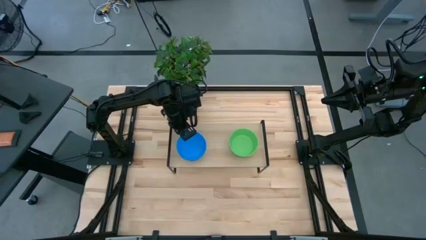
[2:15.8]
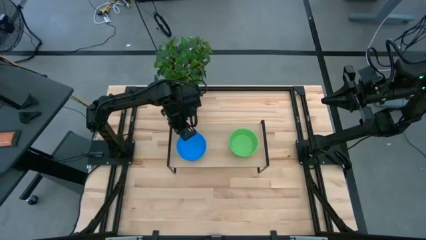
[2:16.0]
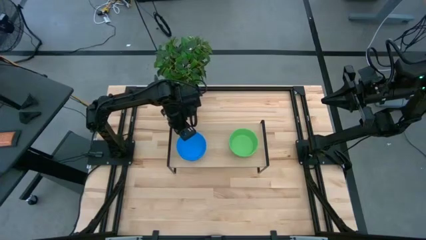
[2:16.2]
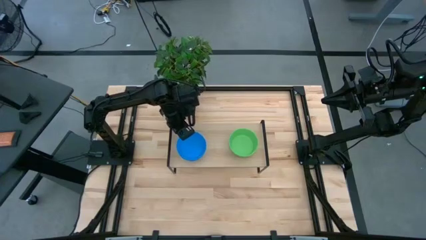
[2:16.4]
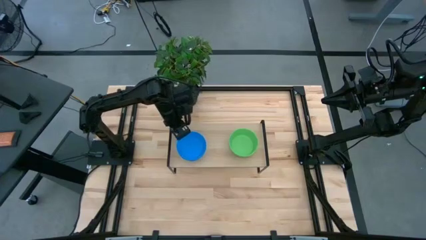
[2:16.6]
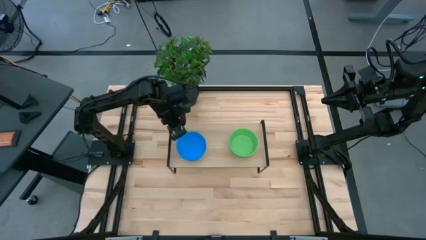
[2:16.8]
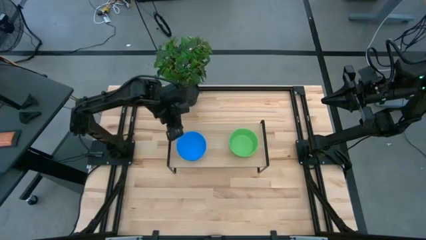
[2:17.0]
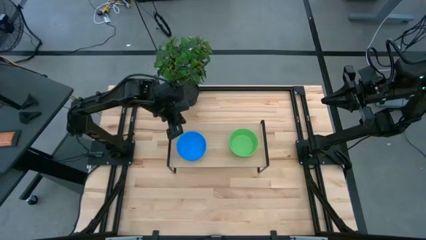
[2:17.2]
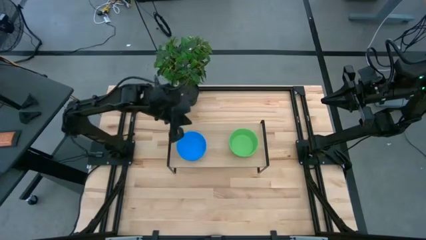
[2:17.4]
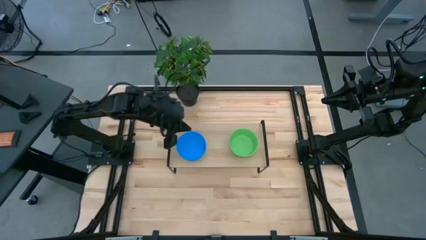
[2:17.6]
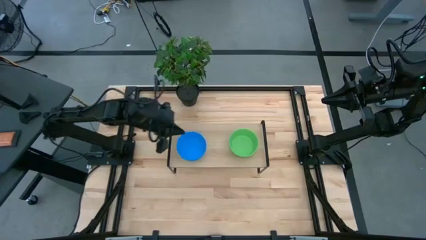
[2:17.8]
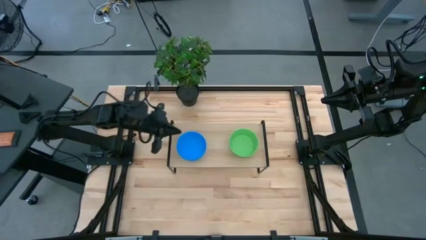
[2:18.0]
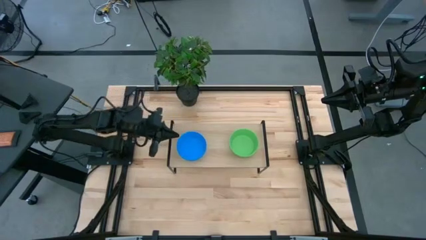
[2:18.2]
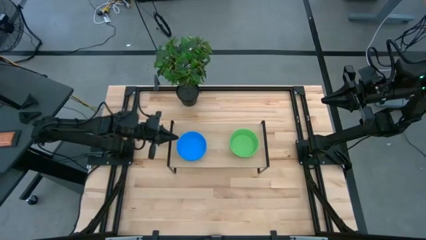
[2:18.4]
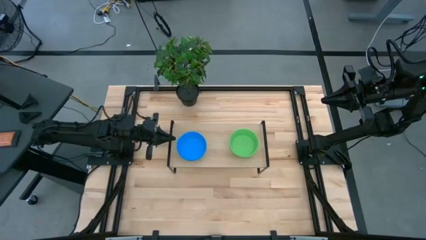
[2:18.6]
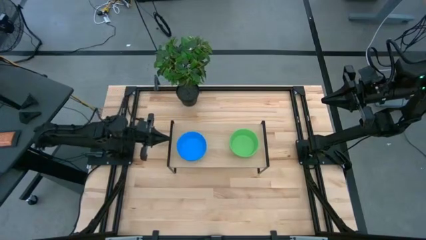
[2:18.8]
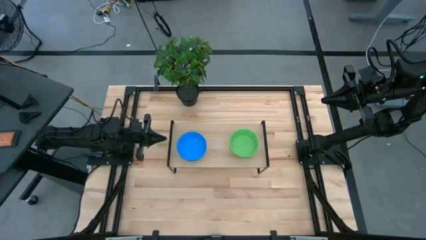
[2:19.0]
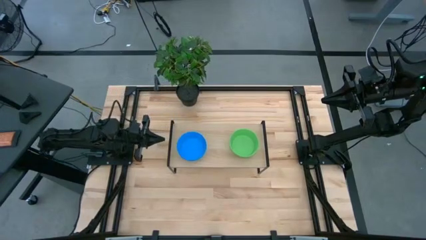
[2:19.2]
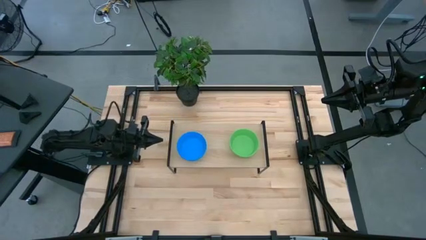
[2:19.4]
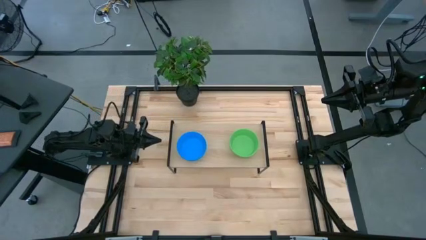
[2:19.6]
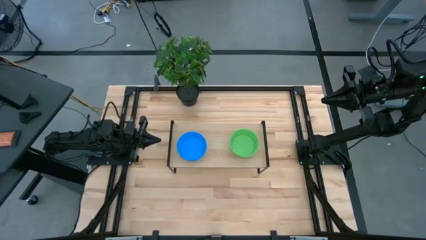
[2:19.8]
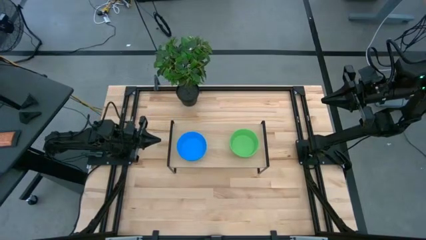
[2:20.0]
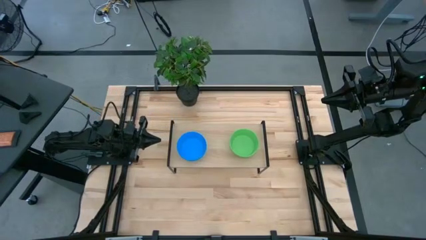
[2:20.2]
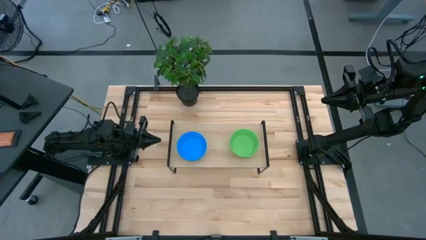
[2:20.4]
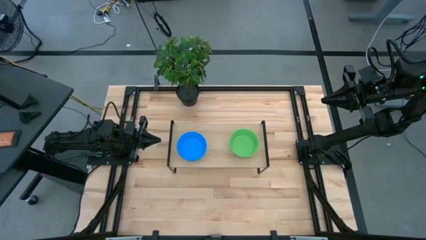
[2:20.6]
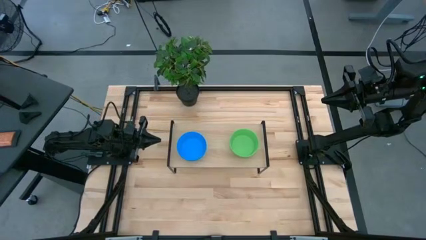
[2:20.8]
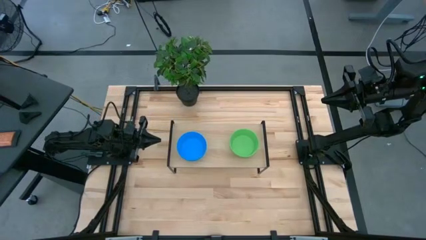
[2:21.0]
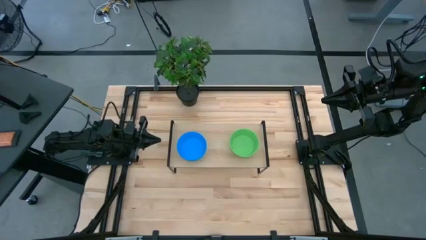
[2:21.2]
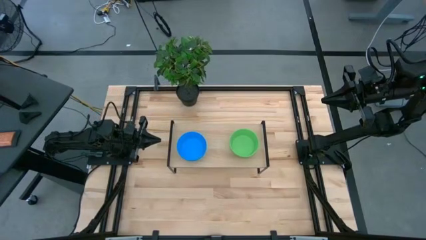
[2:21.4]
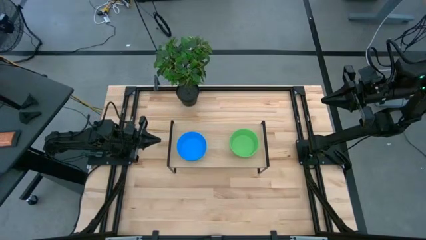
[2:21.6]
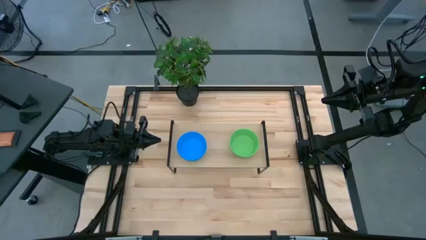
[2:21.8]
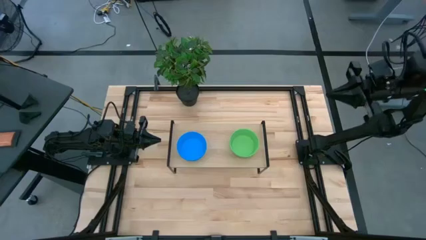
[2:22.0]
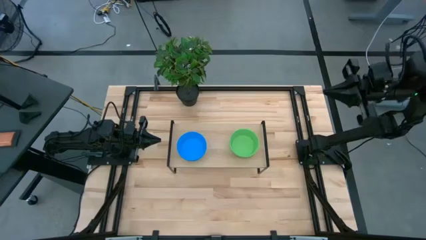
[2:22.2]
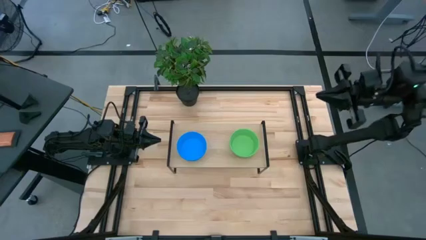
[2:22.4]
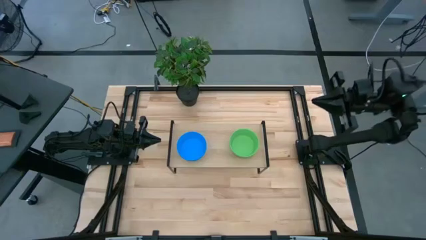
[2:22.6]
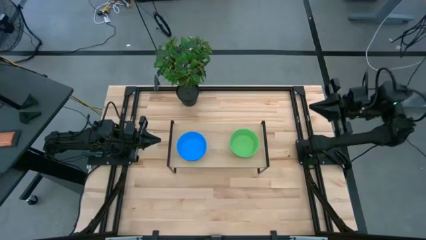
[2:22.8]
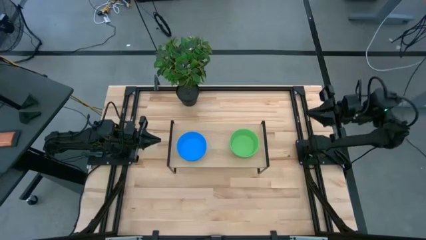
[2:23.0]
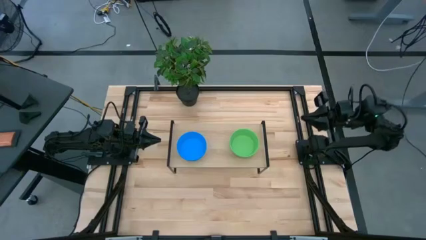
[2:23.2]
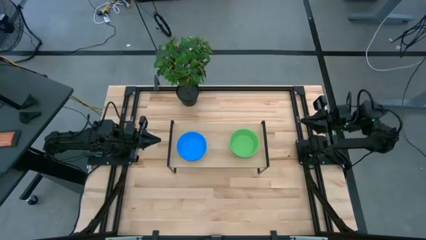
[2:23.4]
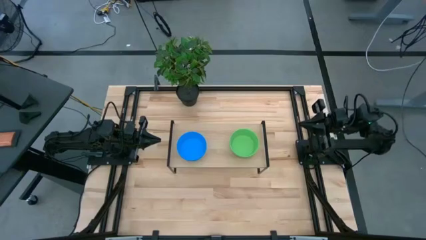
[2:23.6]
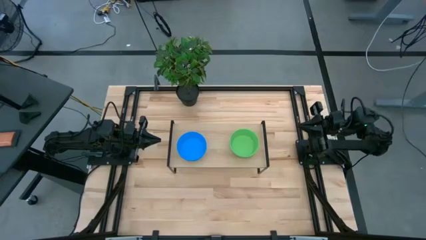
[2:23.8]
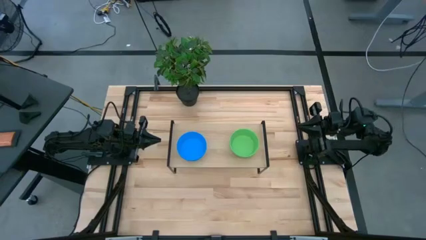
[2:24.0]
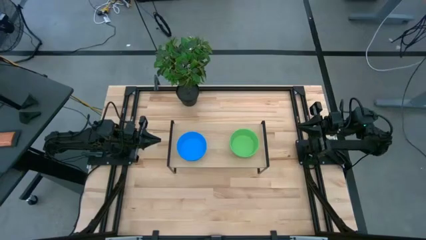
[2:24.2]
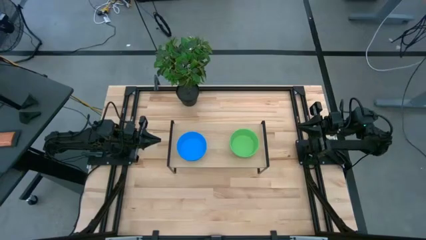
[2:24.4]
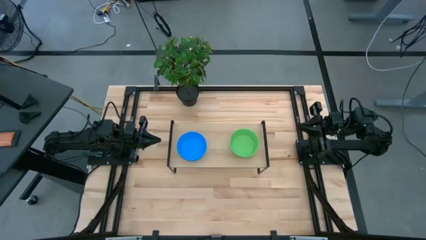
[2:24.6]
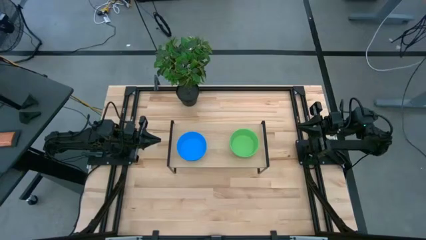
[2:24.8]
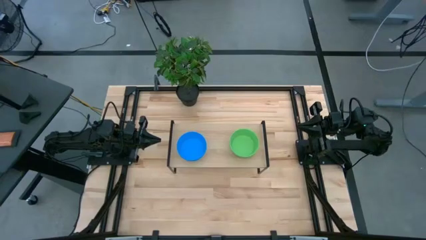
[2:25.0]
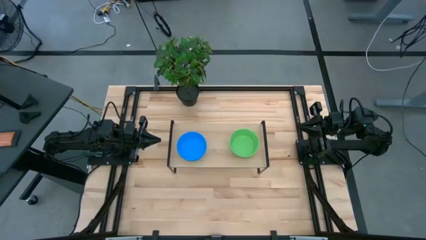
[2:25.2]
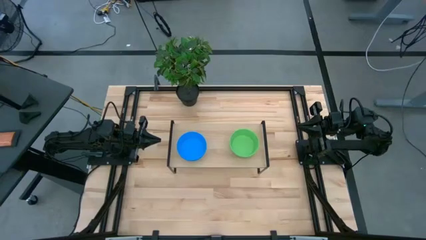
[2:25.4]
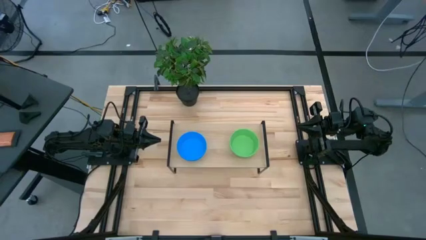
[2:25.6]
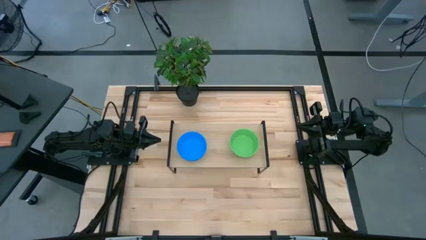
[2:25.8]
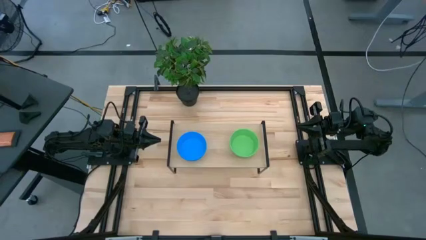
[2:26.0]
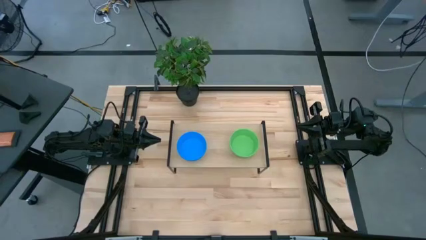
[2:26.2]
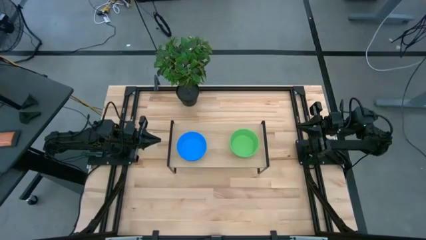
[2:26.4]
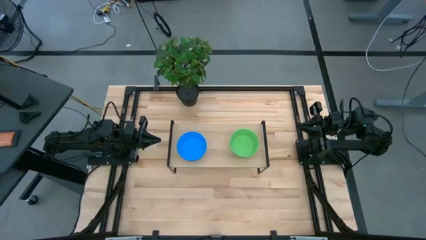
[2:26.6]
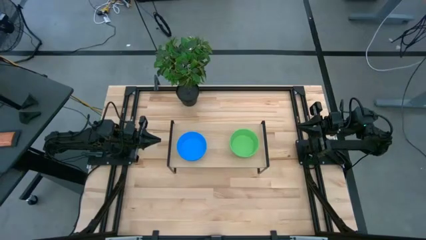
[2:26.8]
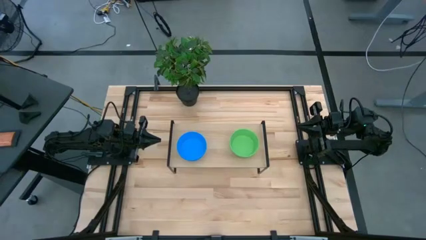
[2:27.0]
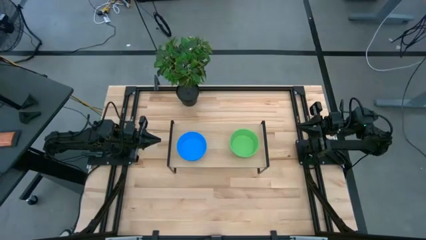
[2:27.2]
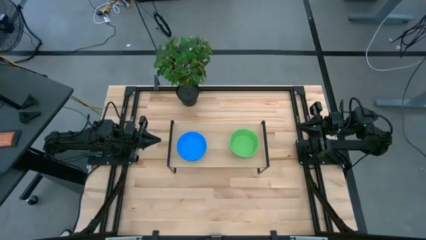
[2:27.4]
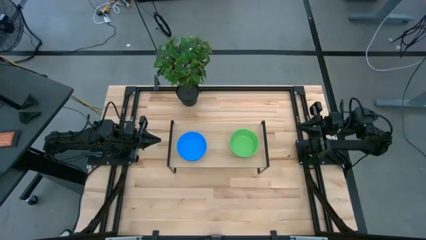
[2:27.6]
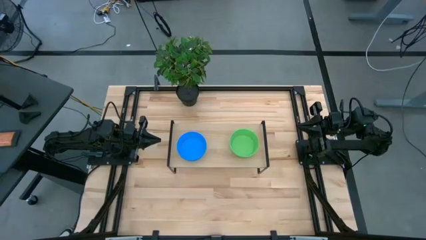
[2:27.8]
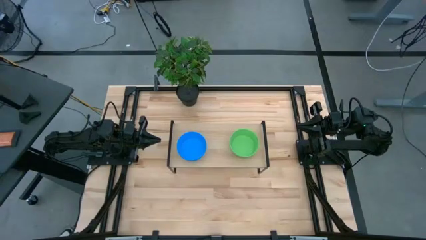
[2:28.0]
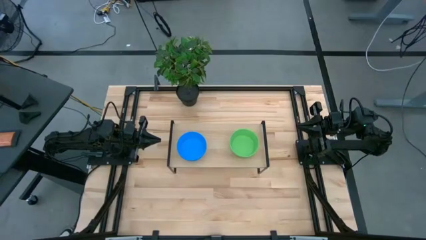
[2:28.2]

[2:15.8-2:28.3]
Task: Pick & Place Mini bowls
Return to Home Position
